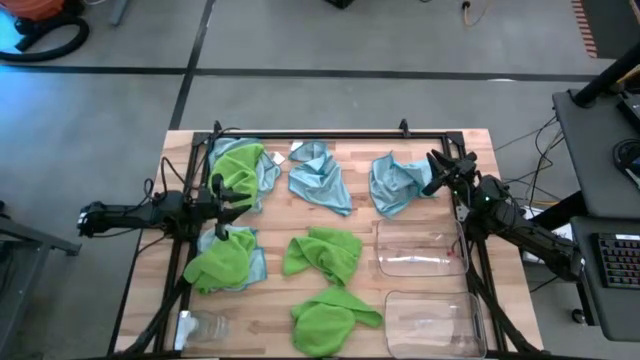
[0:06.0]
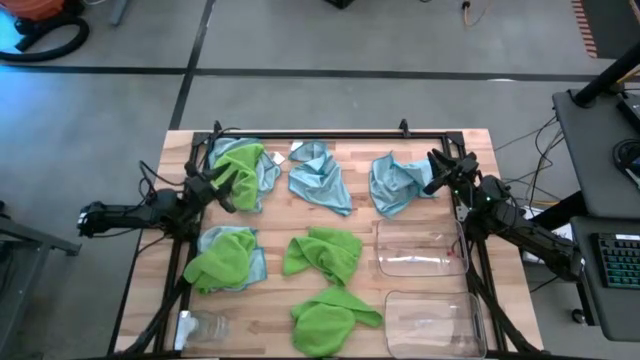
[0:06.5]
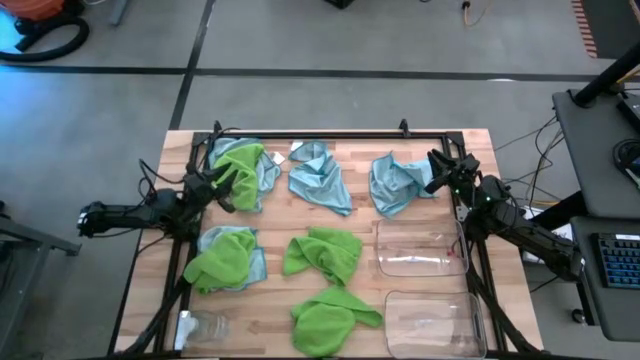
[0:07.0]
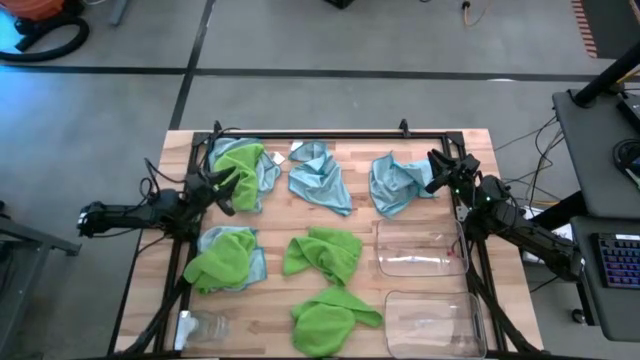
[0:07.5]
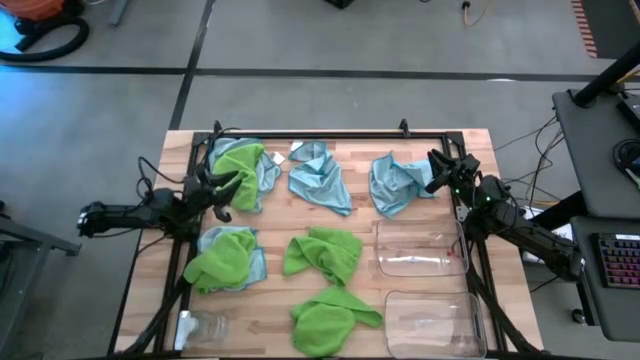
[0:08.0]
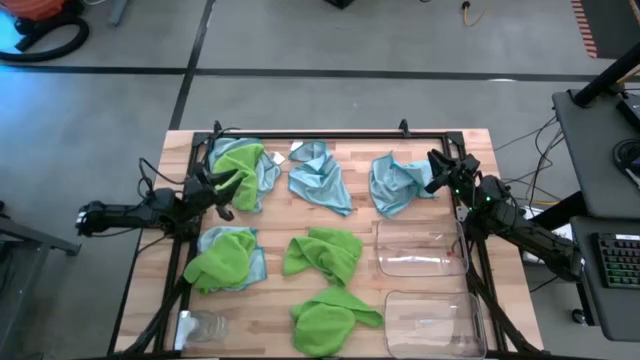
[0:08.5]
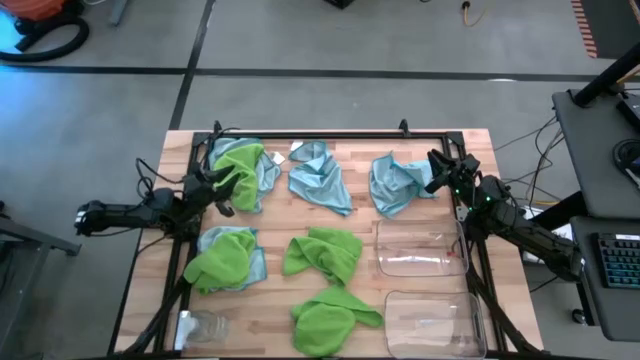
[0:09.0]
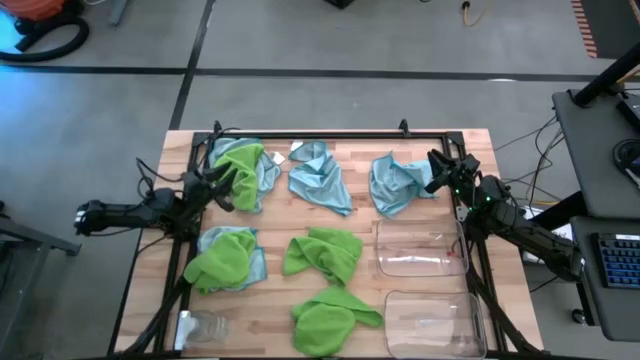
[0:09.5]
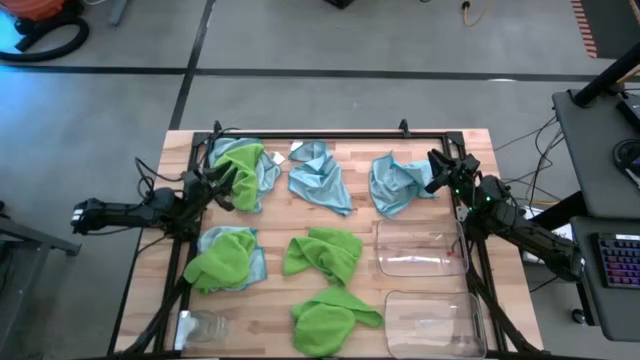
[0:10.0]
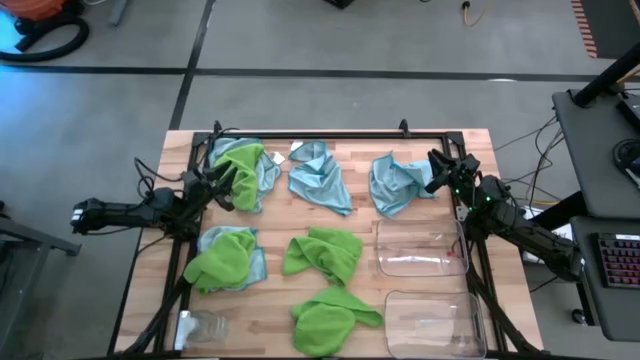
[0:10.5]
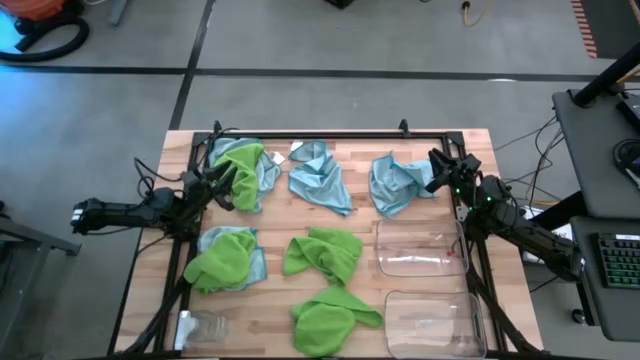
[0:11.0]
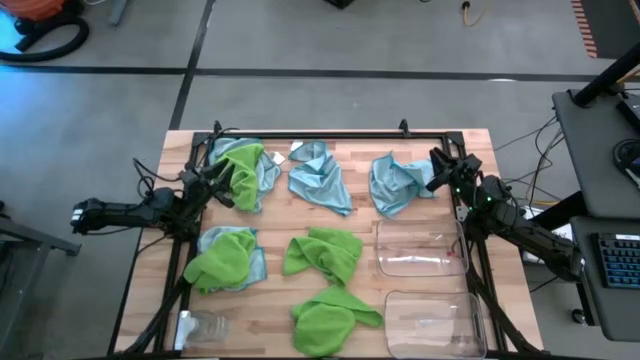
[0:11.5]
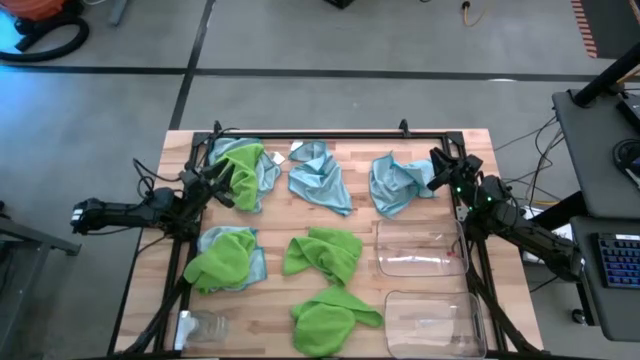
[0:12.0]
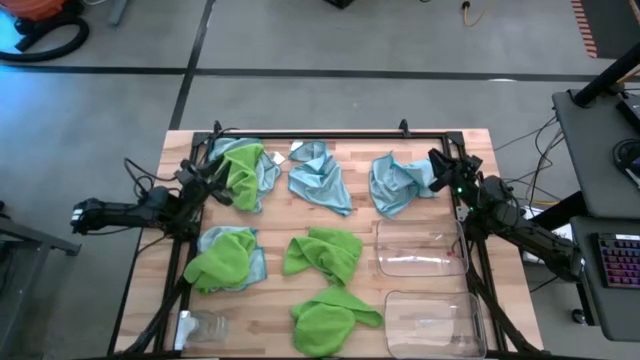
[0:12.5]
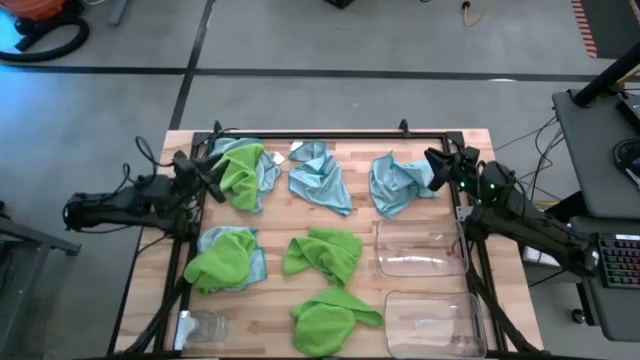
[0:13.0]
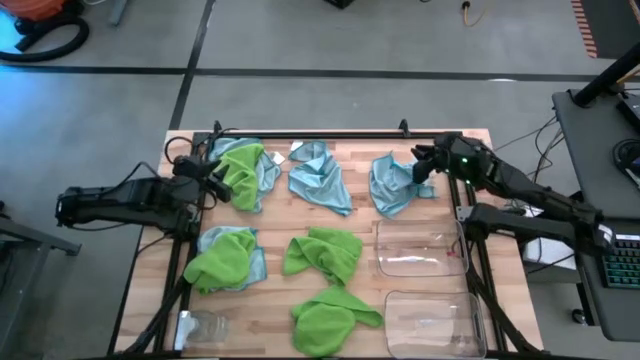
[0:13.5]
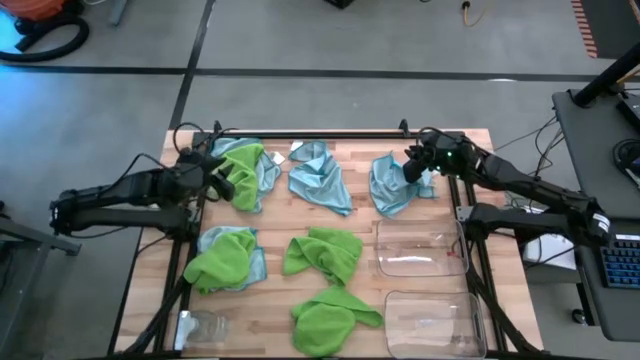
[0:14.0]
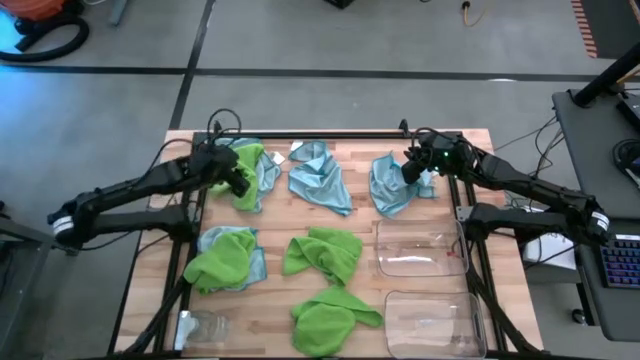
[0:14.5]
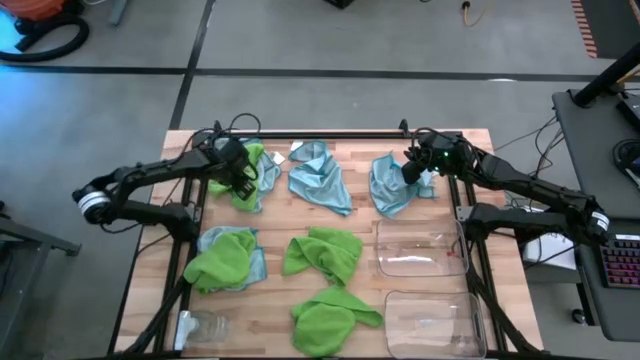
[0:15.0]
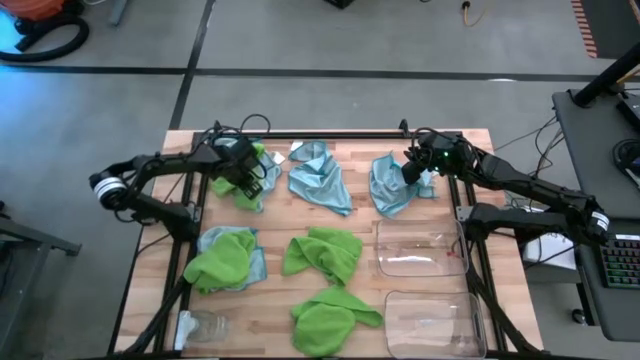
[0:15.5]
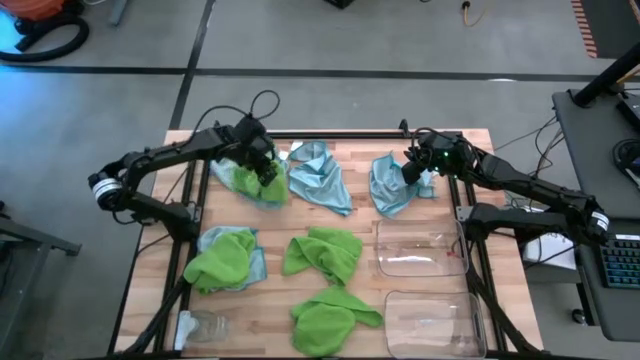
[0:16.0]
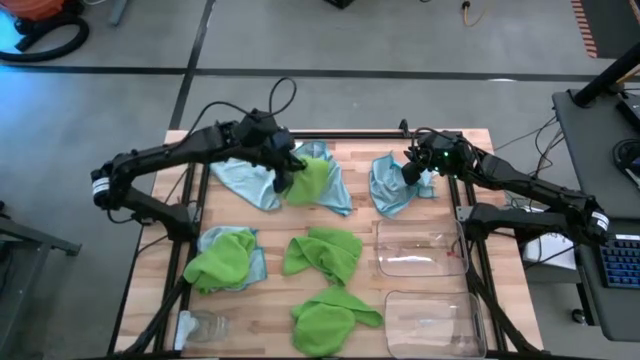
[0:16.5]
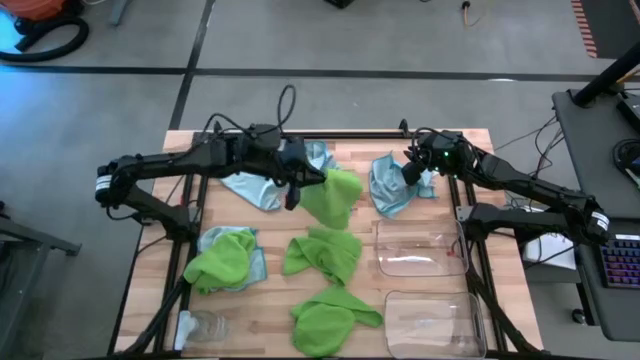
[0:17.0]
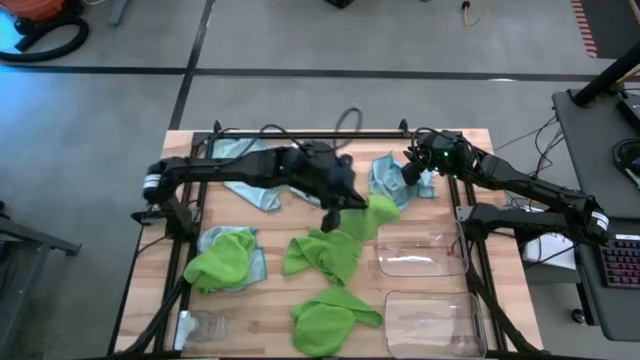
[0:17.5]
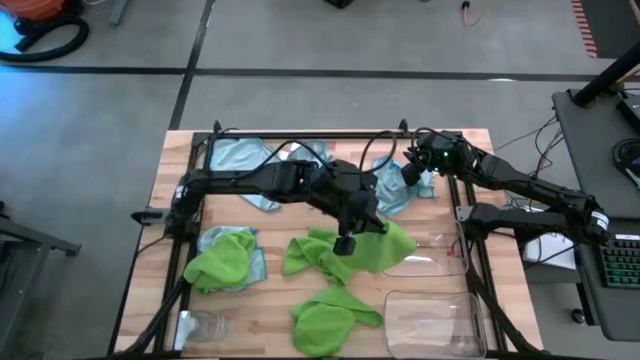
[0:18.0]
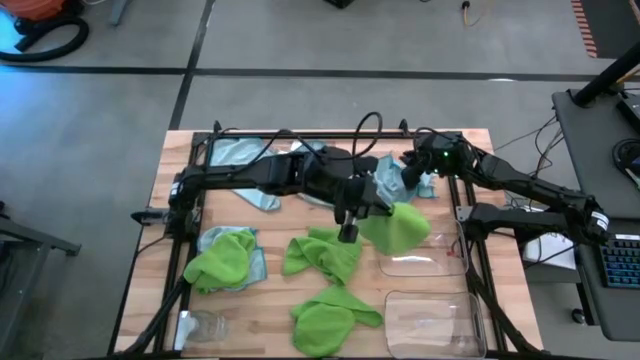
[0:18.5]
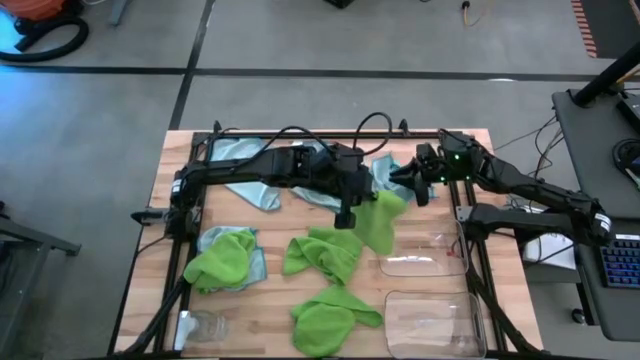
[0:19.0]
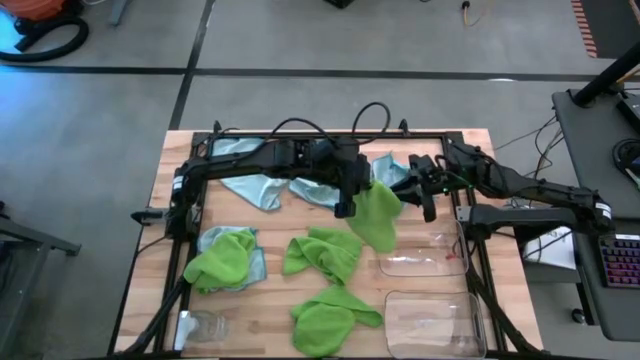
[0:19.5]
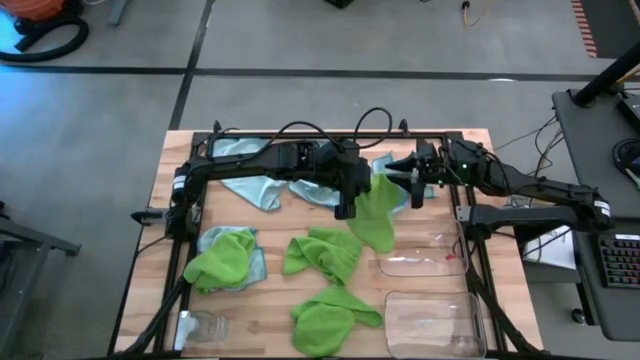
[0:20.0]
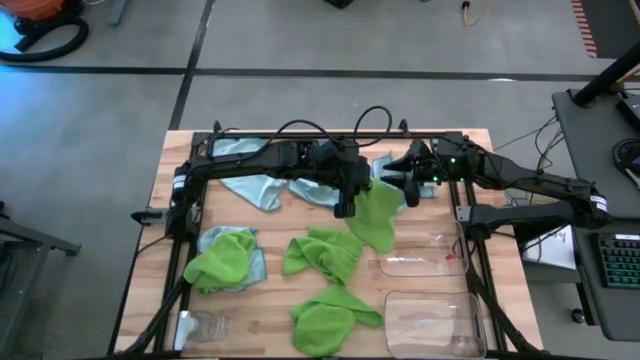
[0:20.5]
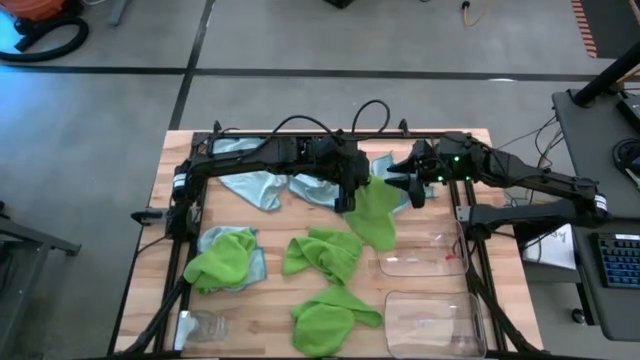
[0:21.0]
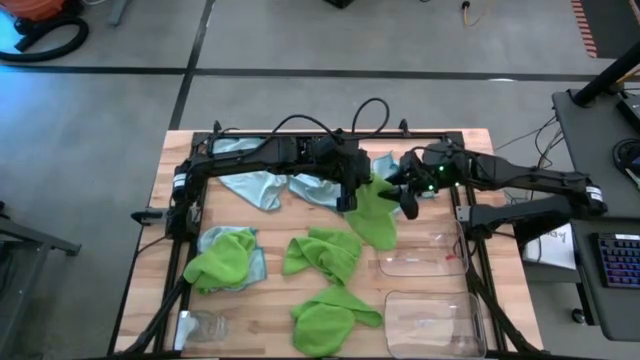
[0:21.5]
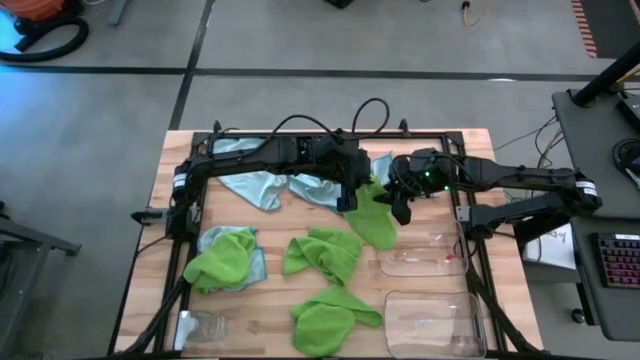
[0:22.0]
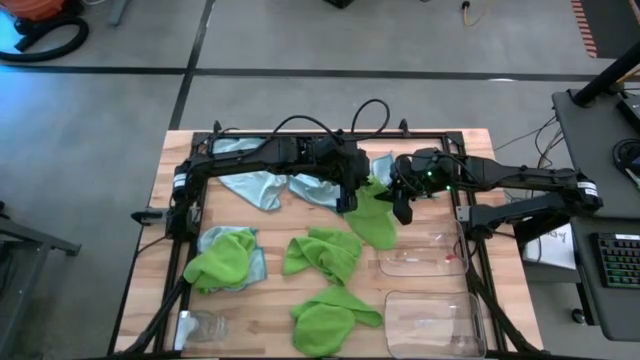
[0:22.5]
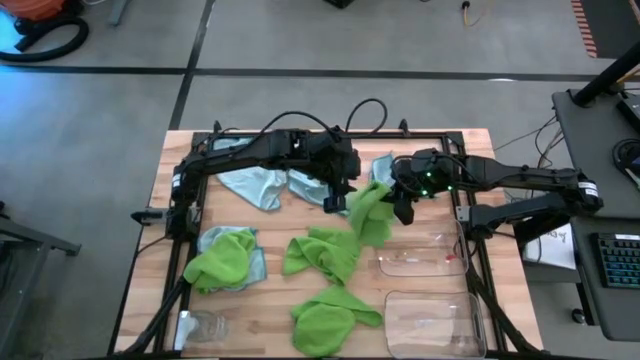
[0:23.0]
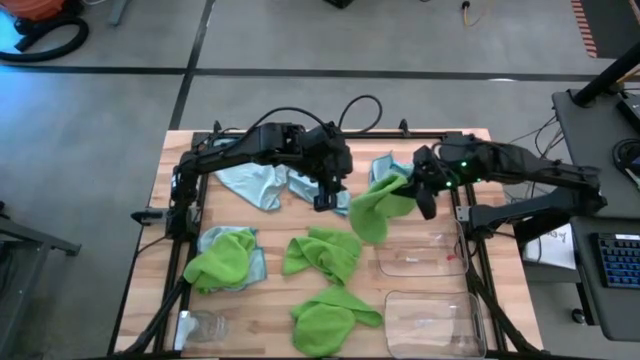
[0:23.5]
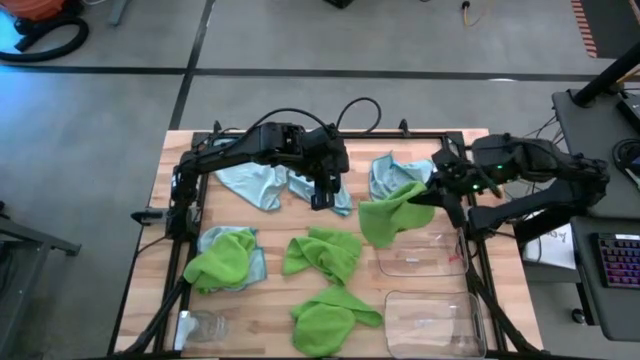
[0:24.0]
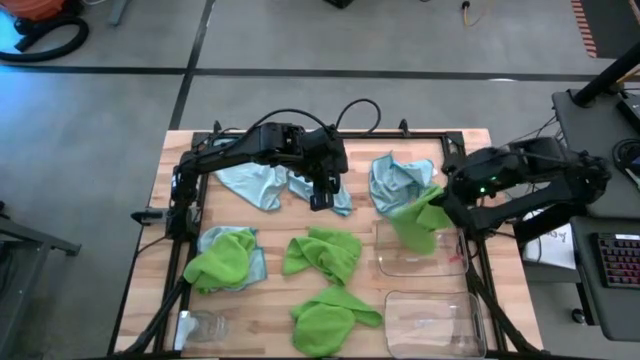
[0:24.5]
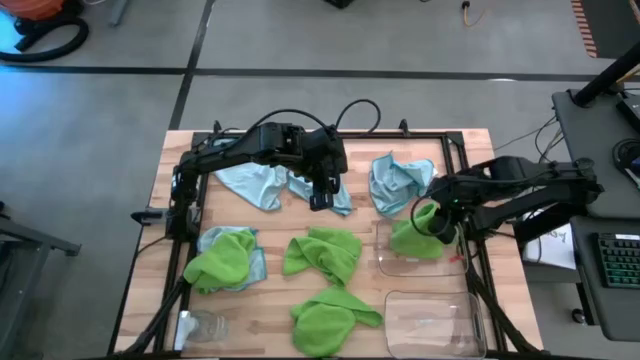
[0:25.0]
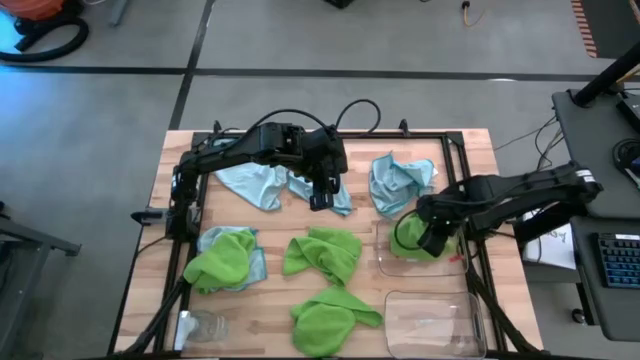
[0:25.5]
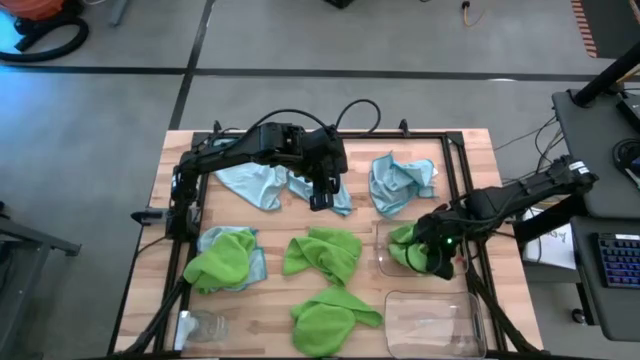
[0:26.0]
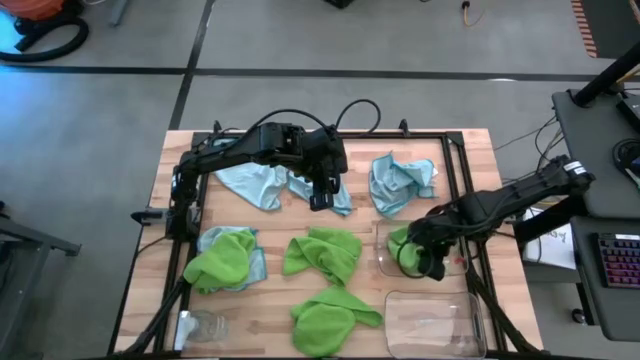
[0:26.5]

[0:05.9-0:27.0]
Task: Sort microfiber towel by color & place in baskets
Put the green microfiber cloth into the top transparent bin
